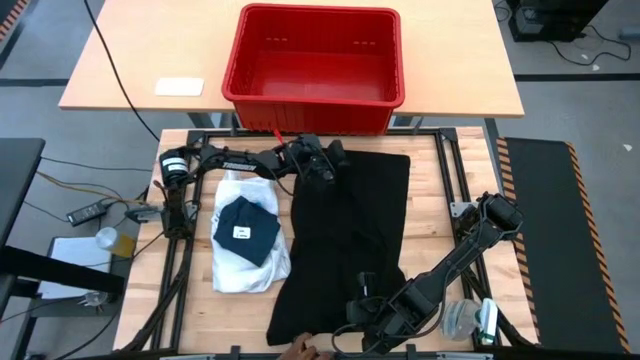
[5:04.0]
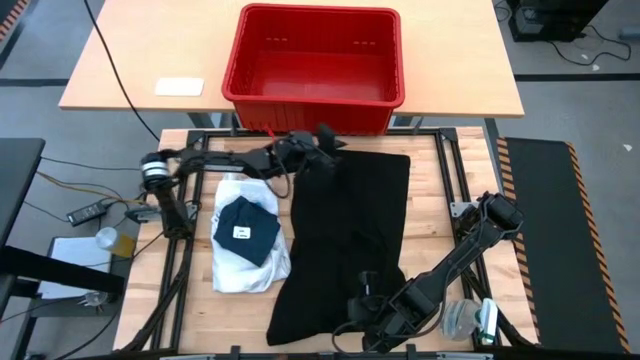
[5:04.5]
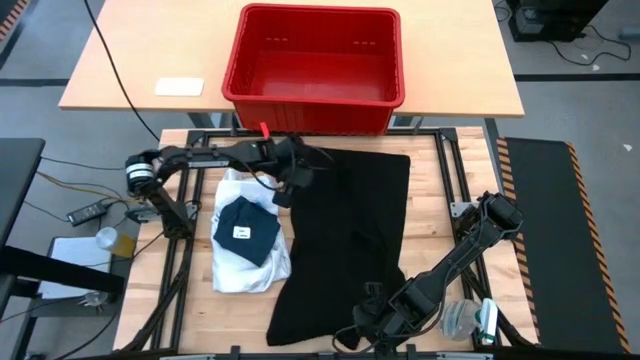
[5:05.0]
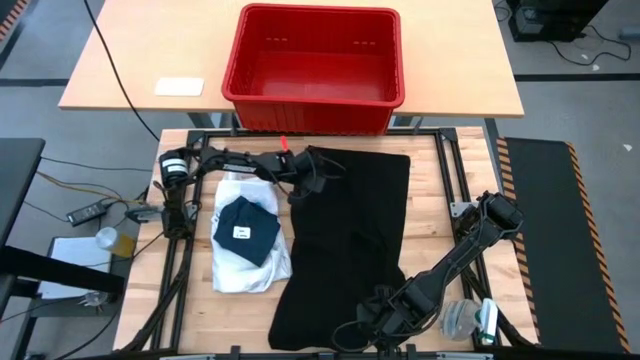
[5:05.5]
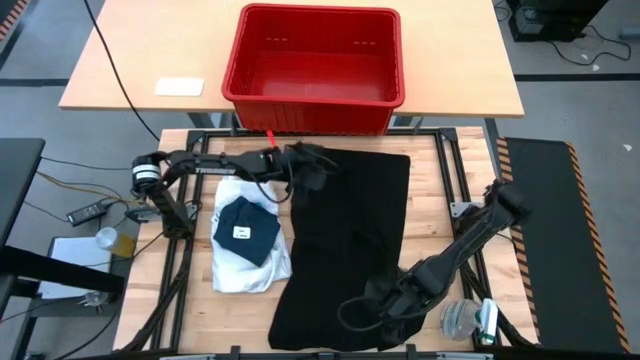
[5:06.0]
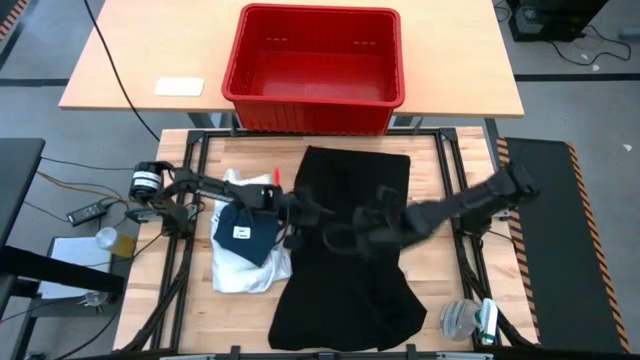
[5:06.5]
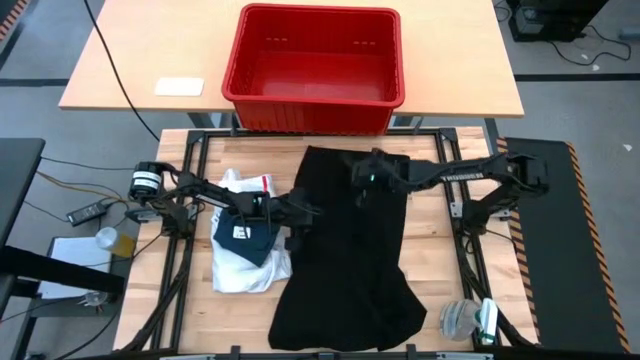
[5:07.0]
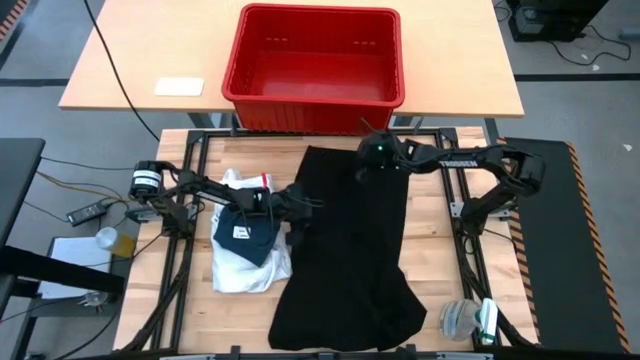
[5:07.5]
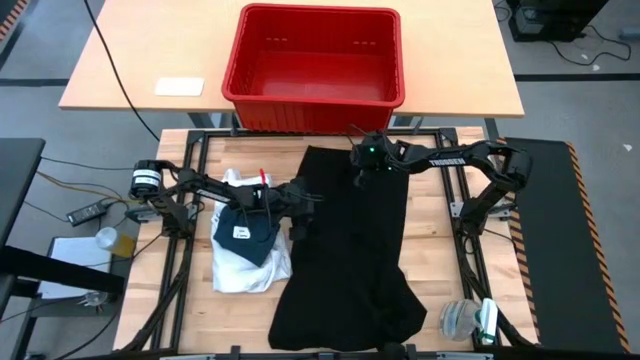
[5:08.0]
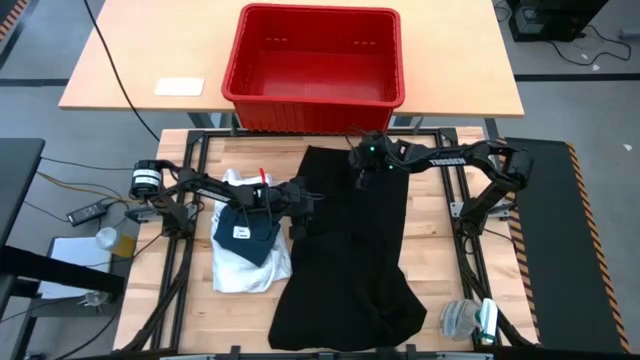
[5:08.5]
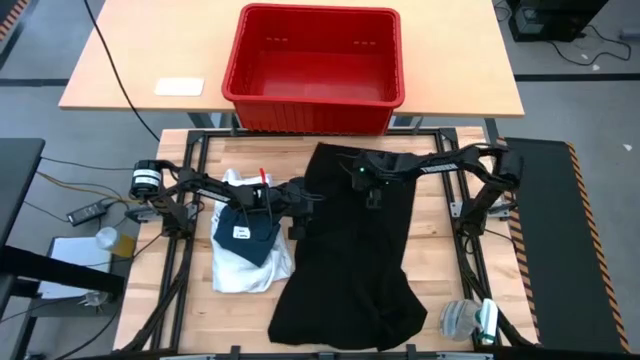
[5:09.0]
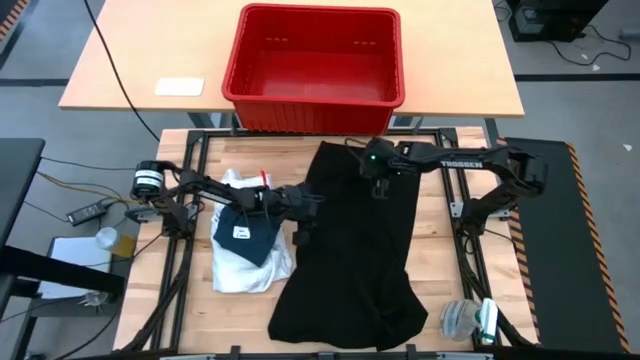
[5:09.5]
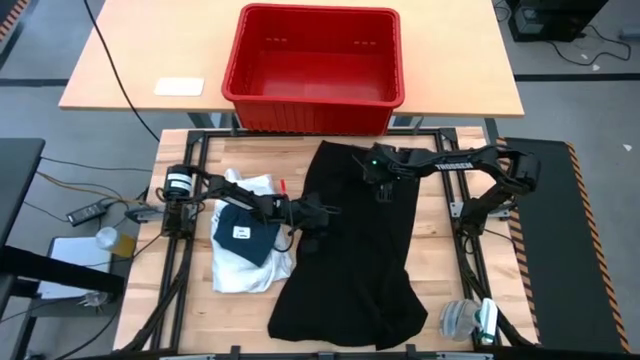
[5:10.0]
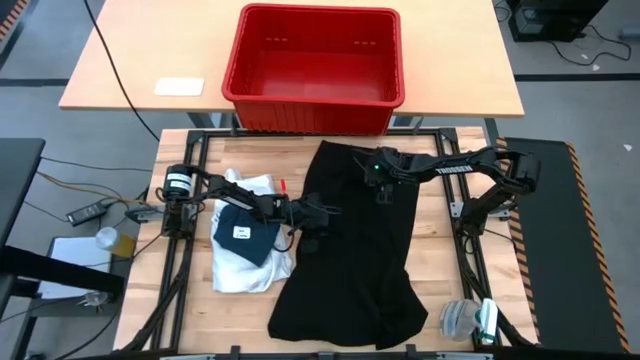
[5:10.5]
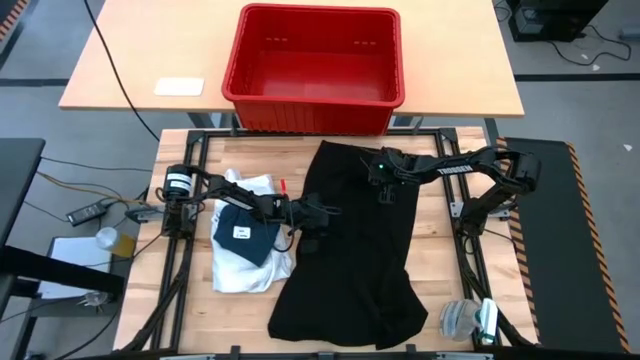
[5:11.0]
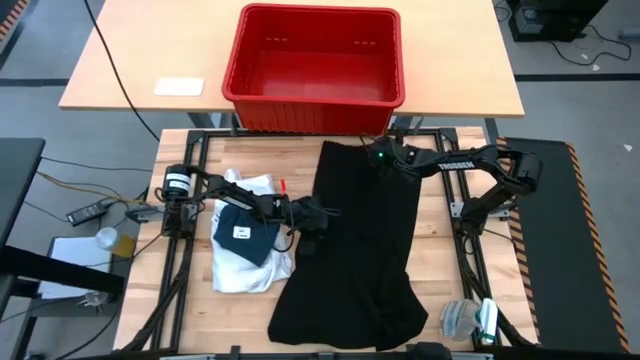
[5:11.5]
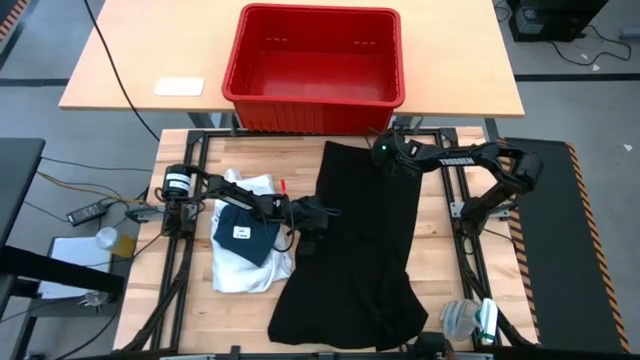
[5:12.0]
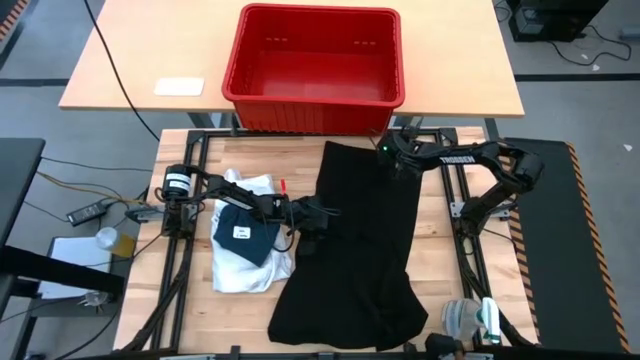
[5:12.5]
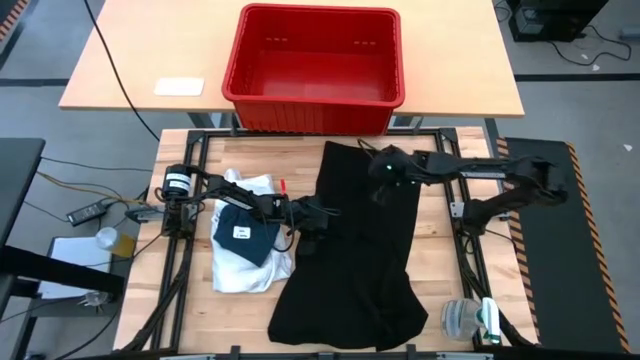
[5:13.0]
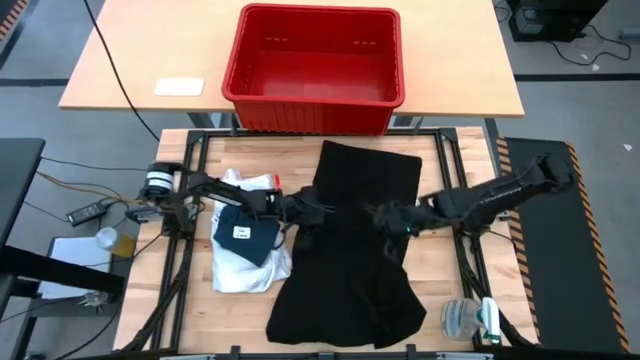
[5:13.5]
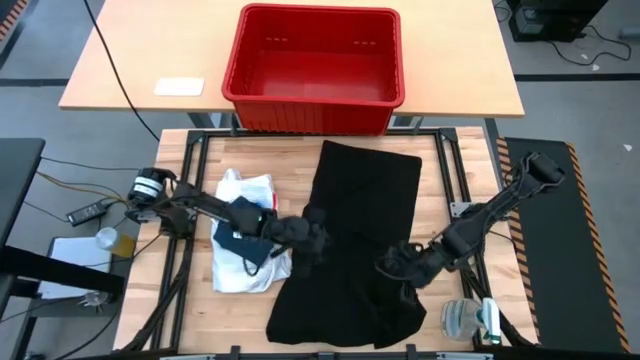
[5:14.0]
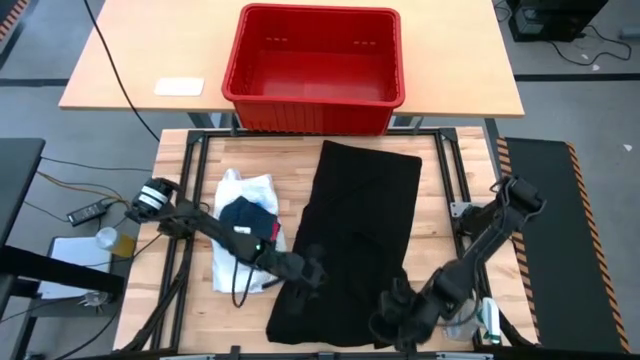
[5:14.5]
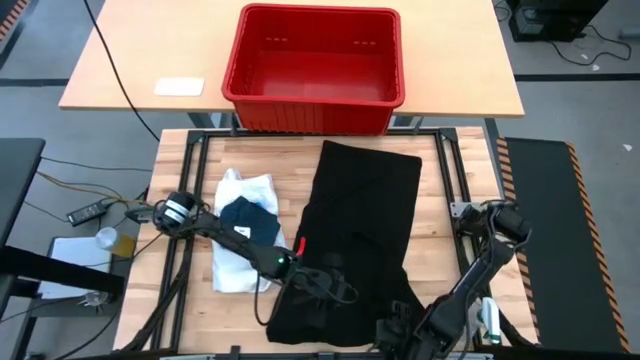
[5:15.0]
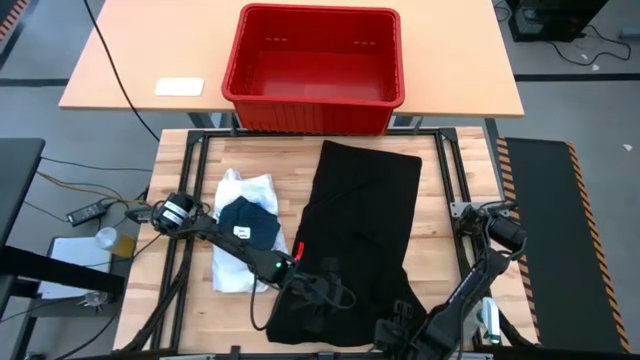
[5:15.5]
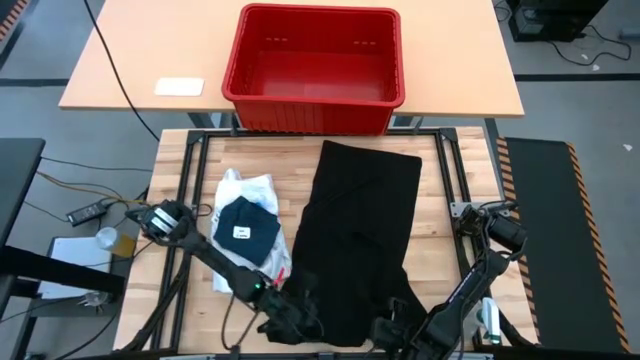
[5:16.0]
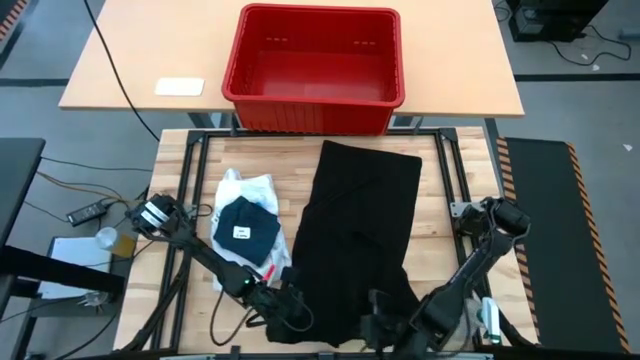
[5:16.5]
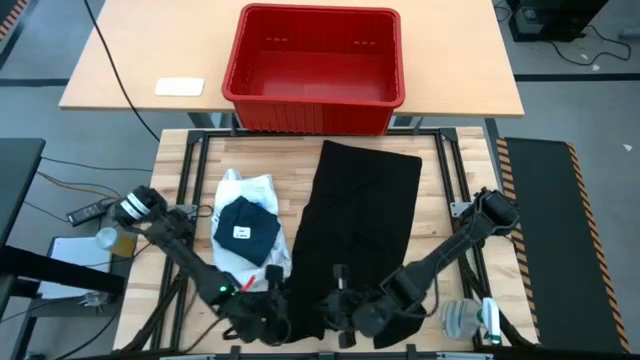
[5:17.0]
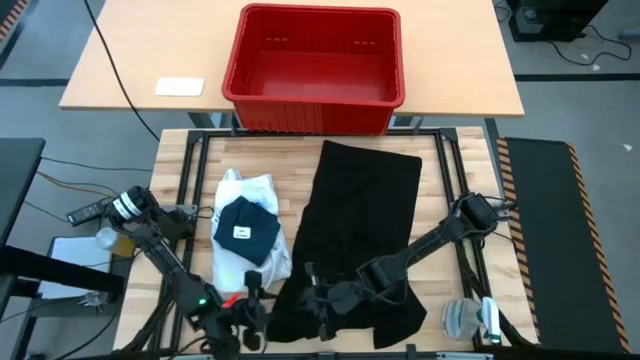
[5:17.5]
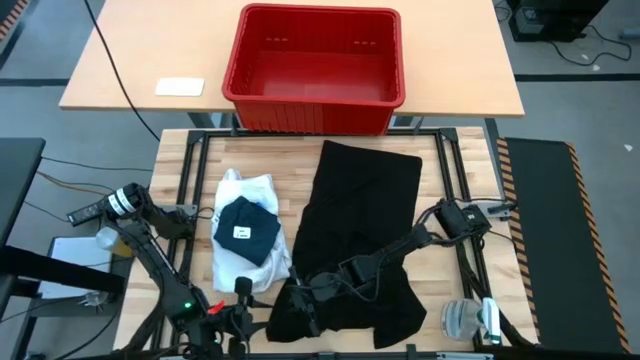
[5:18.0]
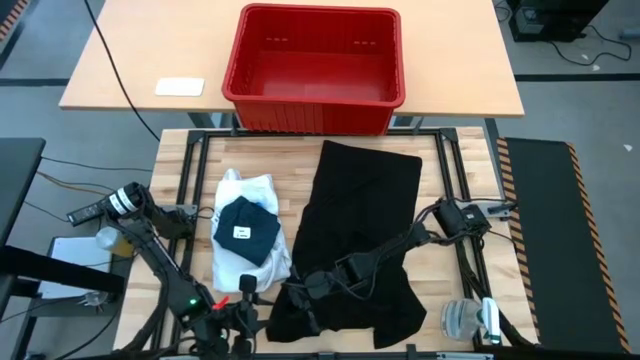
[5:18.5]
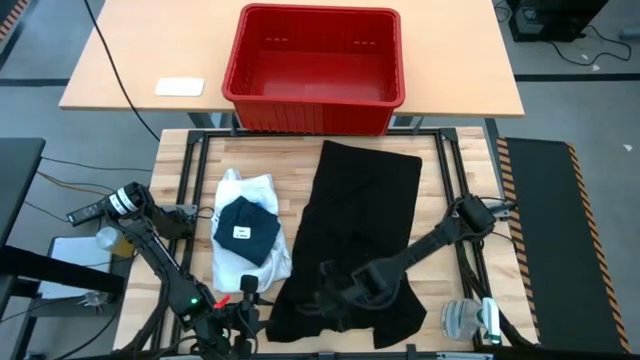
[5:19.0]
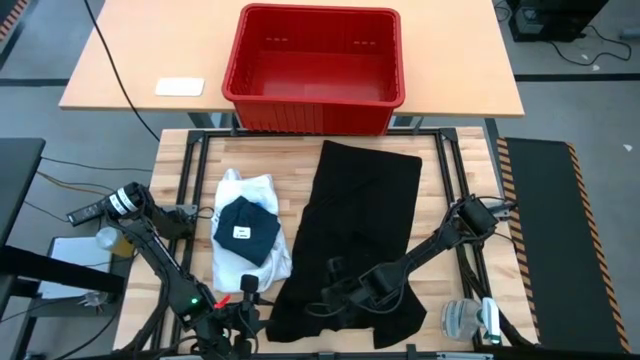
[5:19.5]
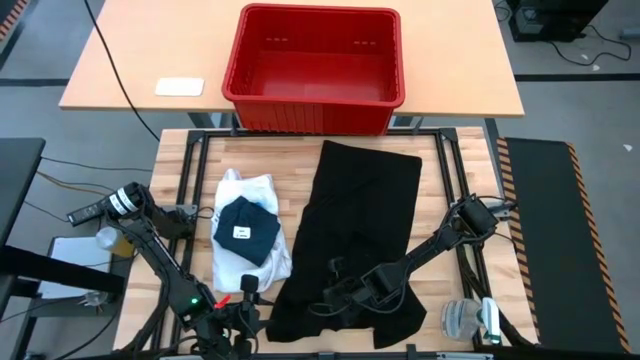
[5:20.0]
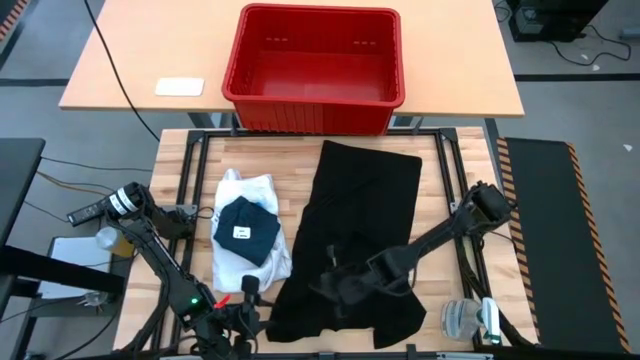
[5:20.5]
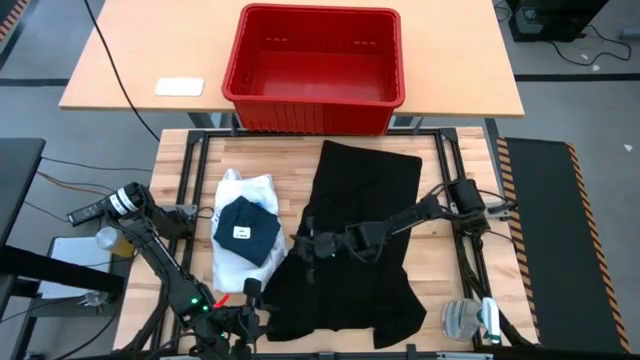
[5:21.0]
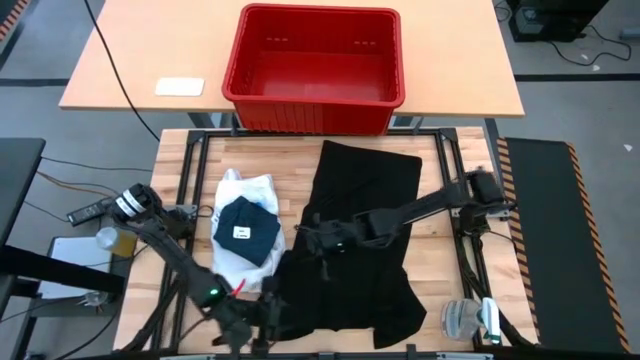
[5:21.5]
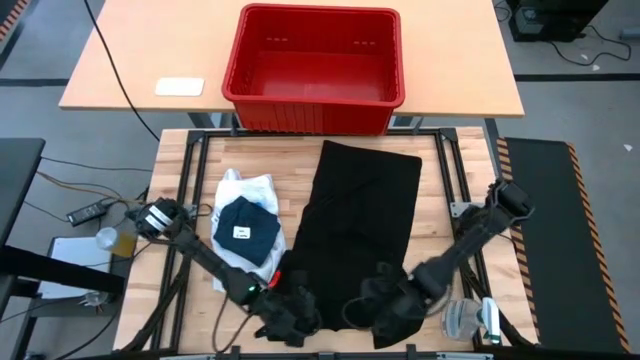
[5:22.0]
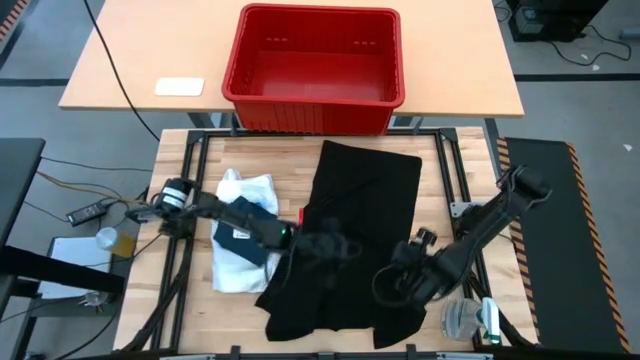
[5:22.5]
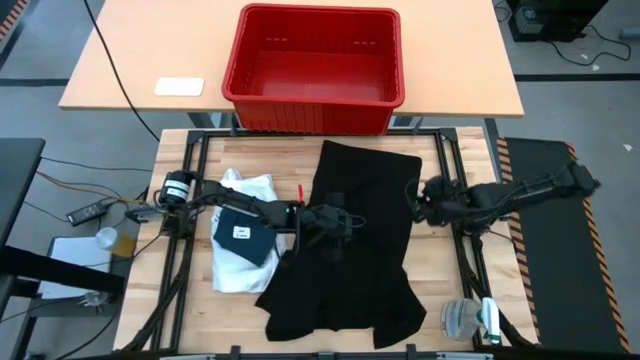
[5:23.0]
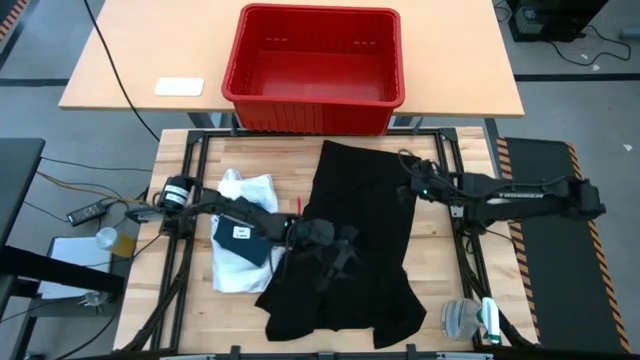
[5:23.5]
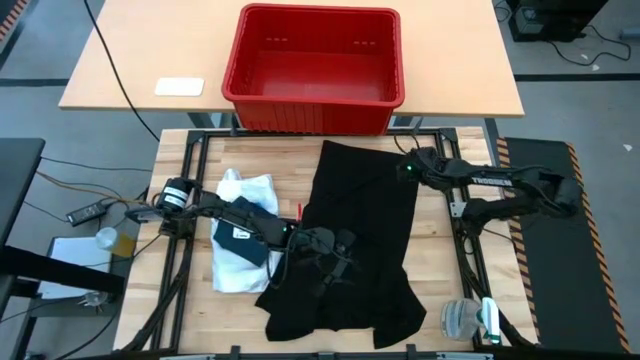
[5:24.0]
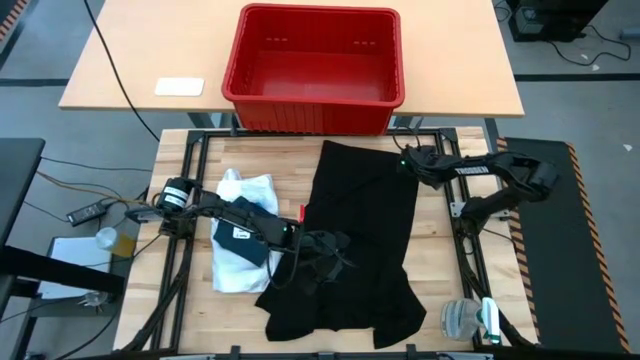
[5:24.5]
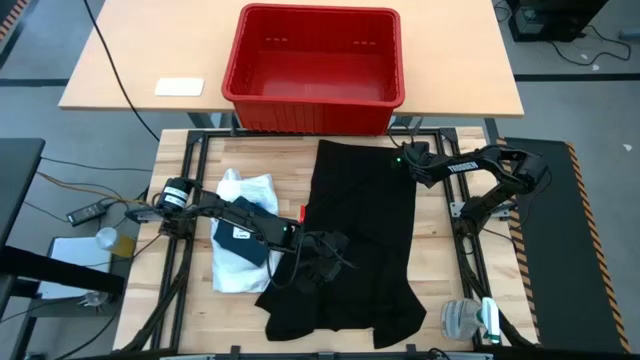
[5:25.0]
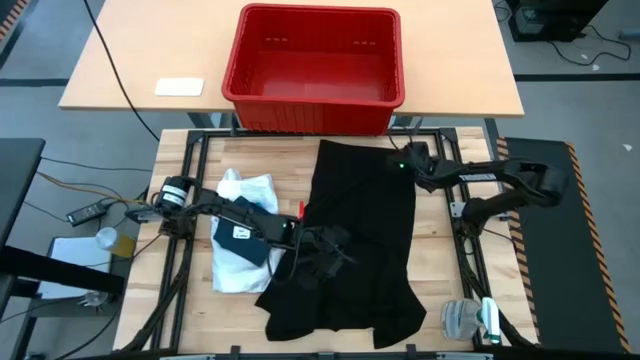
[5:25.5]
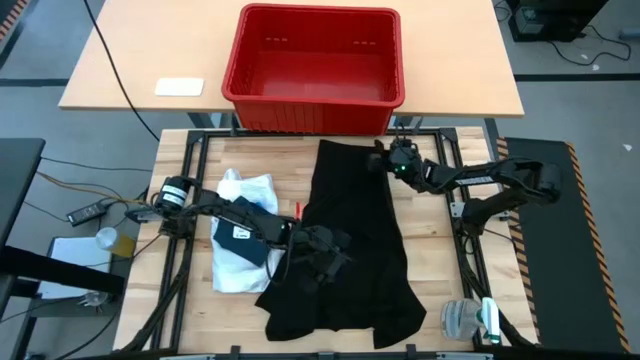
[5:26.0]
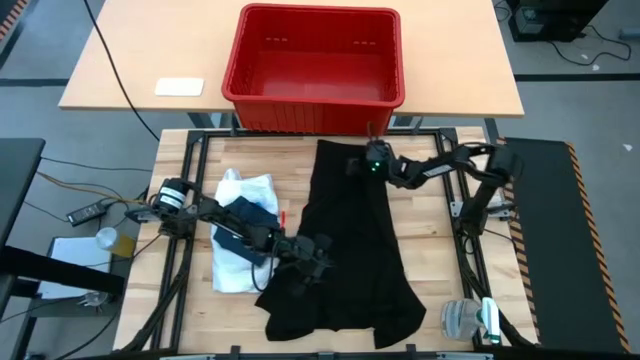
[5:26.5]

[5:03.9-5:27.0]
Task: Fold laundry
Fold the black shirt
